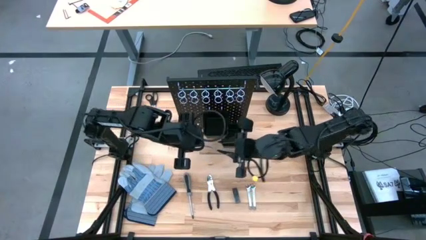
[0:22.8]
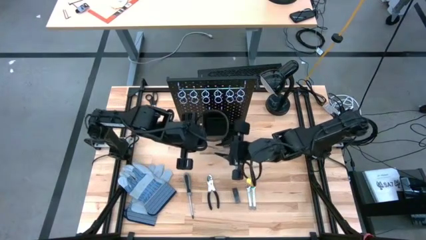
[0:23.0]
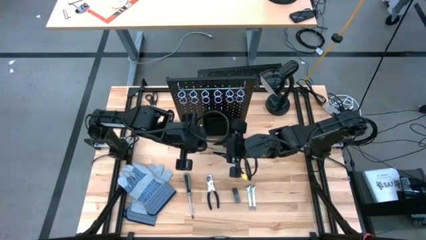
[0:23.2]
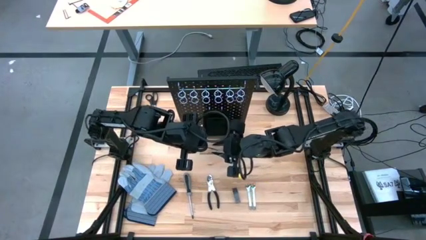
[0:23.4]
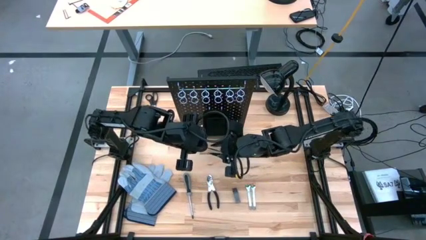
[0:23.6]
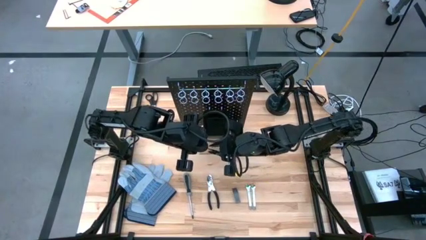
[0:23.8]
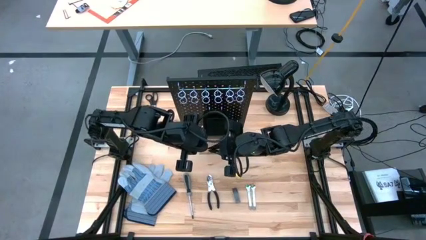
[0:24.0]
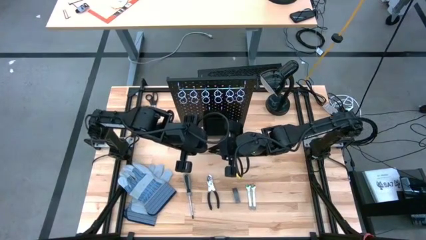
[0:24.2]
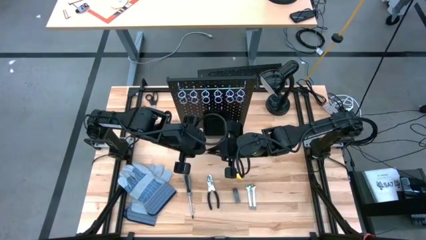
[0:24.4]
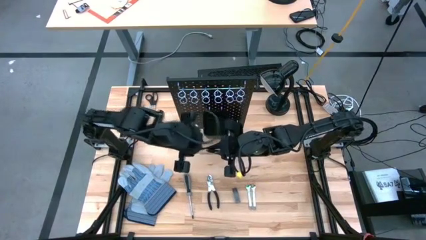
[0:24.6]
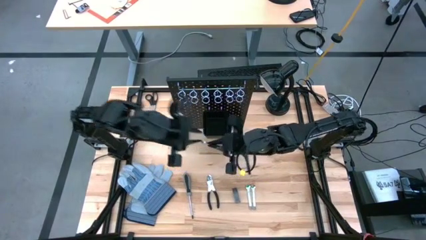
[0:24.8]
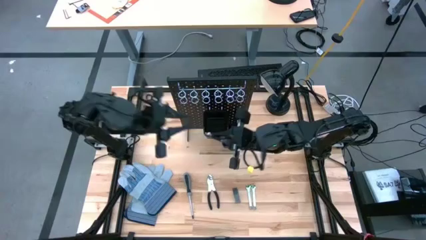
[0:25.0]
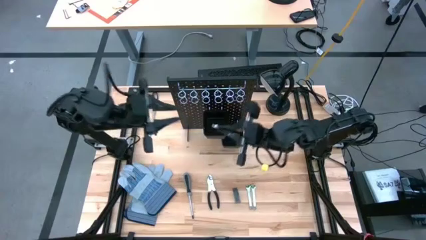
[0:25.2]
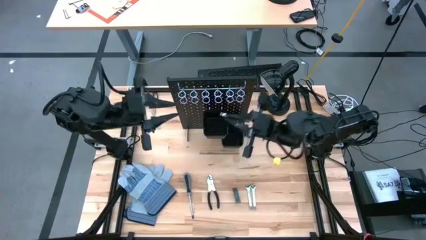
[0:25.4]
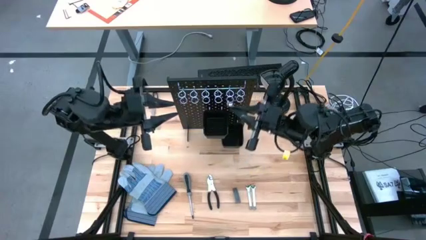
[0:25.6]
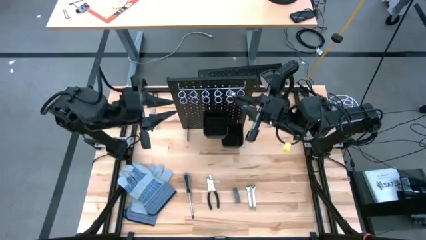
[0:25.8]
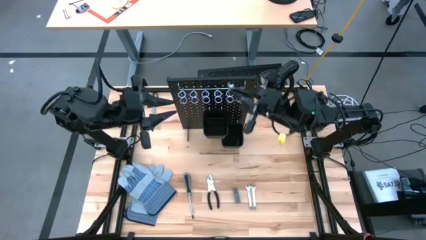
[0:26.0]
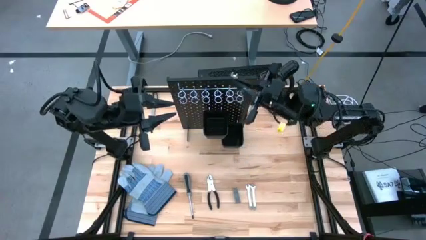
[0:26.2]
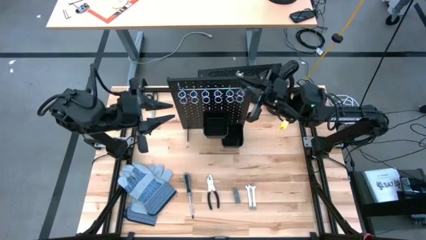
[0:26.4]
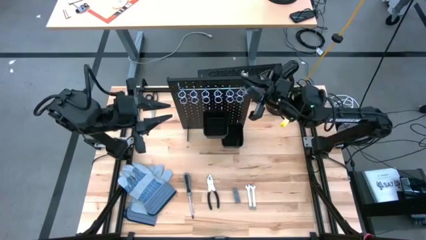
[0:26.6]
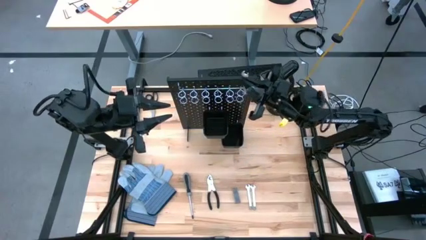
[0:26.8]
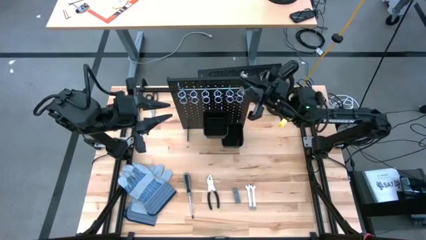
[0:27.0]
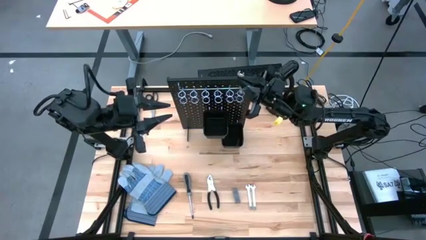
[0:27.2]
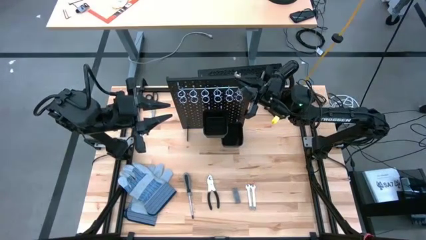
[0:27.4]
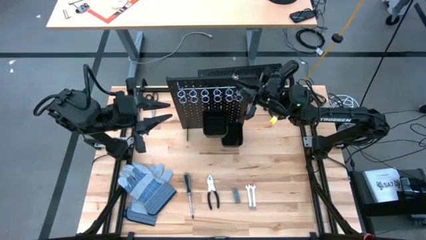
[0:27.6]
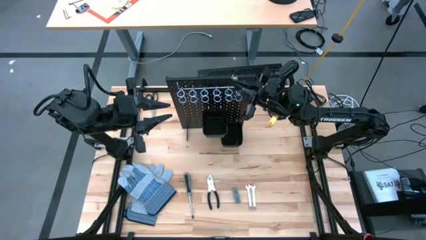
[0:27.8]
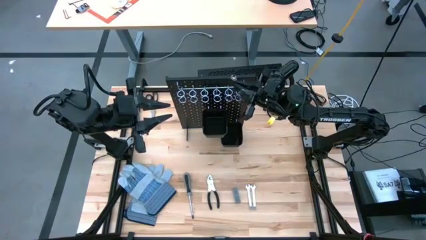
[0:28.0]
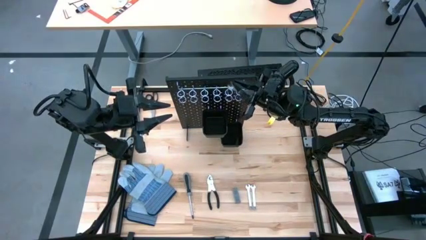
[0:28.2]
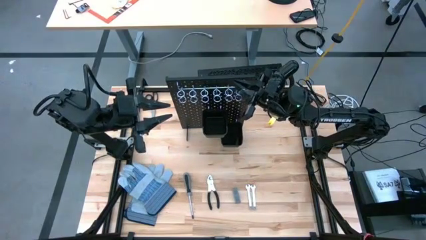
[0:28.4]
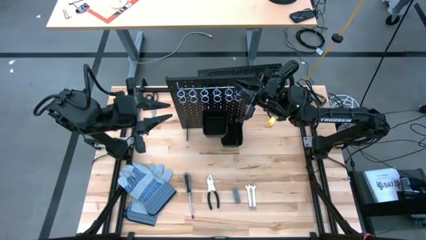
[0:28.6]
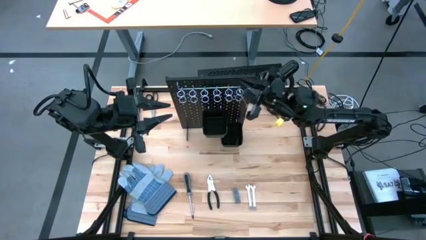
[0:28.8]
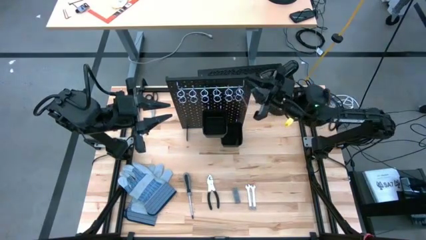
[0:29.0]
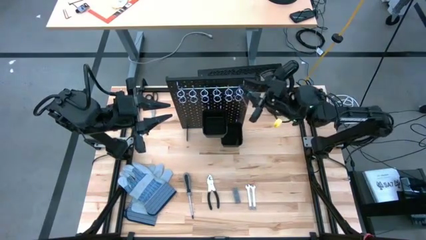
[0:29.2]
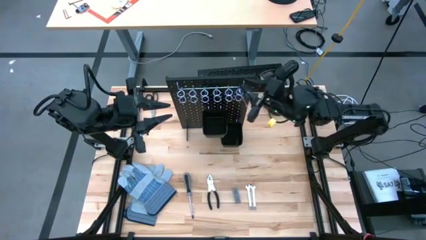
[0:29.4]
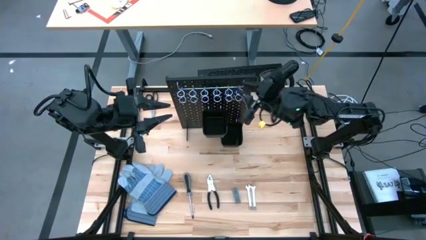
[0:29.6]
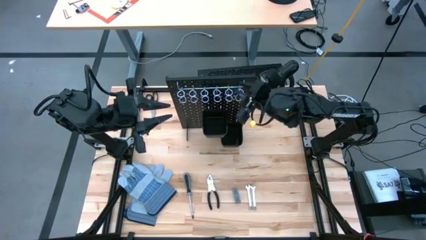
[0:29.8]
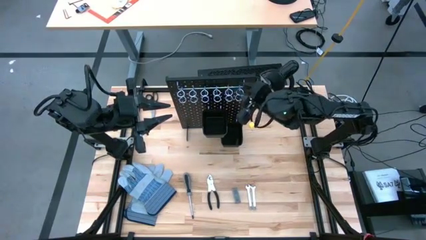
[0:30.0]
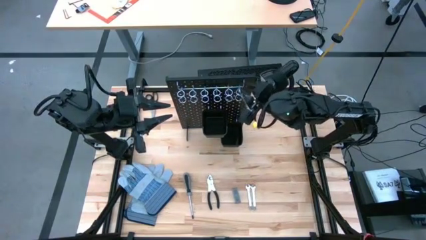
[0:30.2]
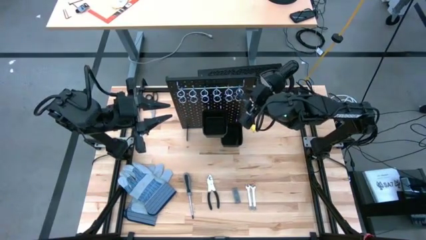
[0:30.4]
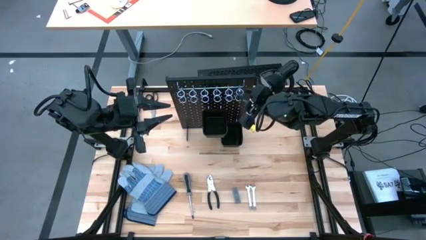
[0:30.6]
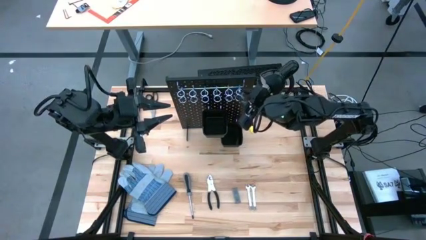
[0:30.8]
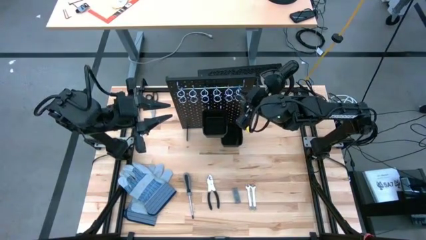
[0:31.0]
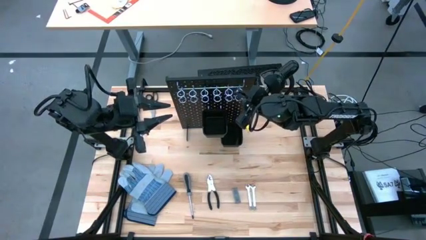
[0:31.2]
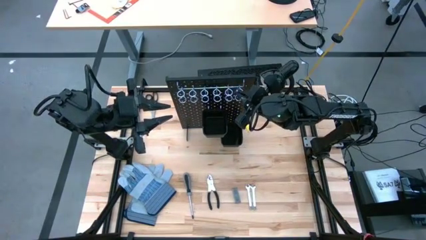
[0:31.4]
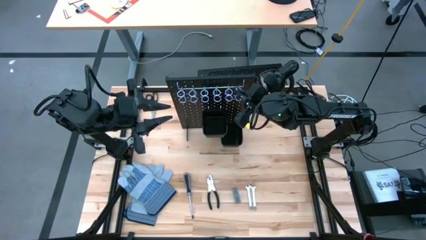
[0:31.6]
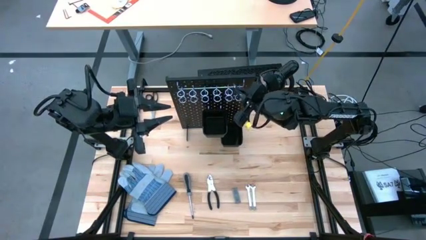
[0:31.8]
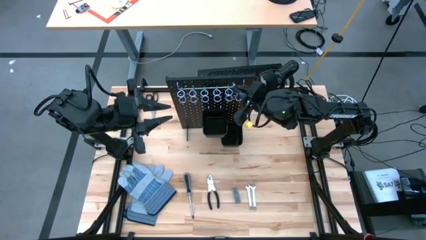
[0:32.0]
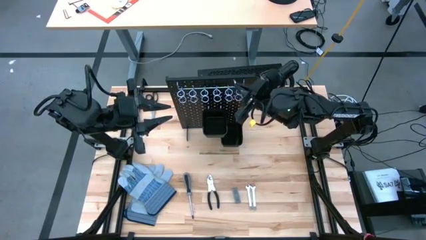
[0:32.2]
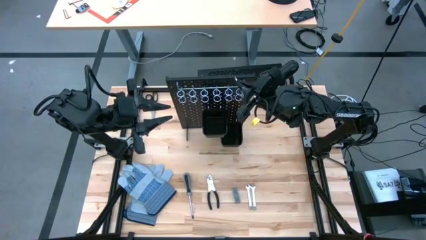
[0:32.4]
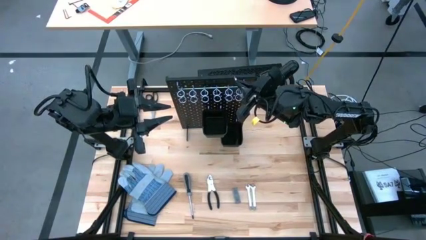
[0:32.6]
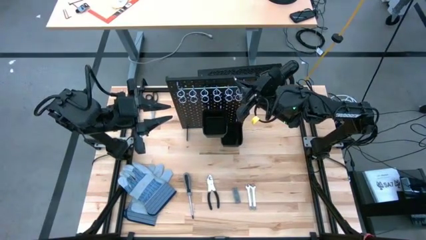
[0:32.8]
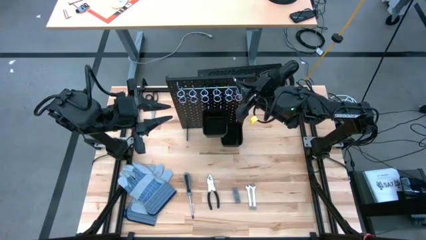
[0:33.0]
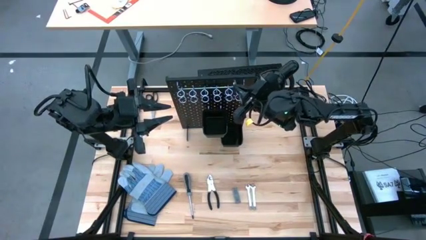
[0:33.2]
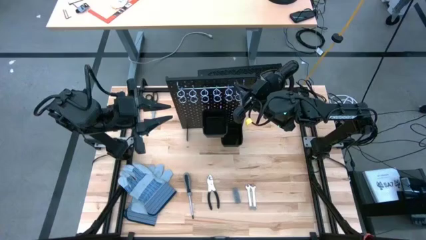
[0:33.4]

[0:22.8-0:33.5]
Task: Hang tools onto peg board
Hang the right silver wrench on the black pegboard

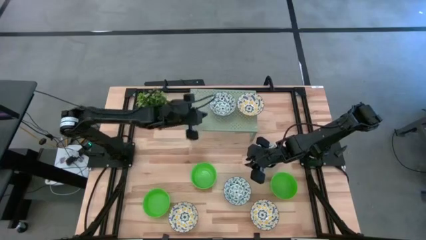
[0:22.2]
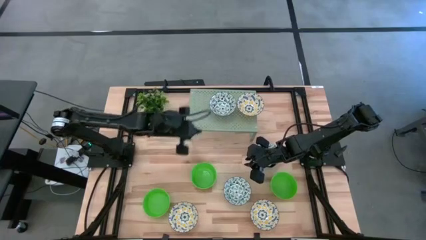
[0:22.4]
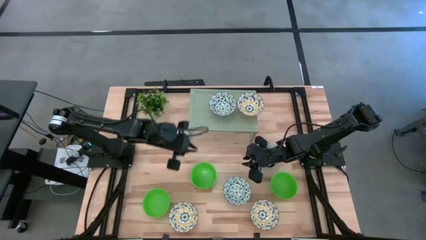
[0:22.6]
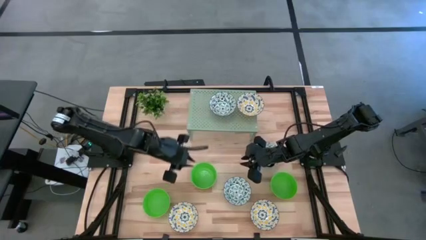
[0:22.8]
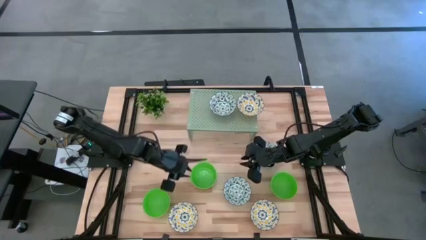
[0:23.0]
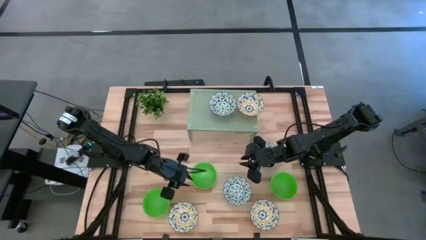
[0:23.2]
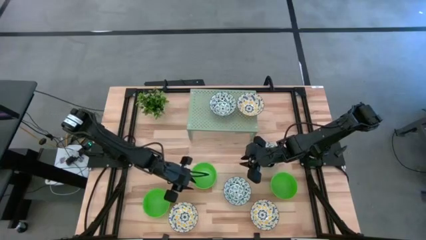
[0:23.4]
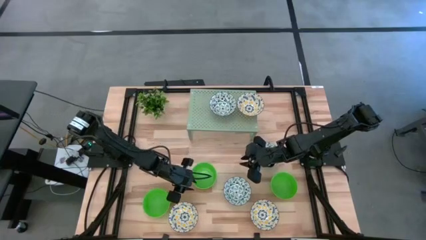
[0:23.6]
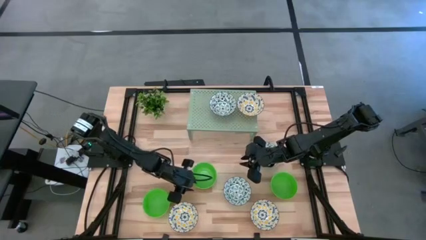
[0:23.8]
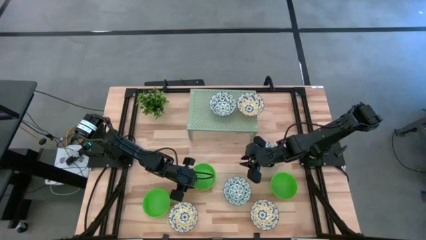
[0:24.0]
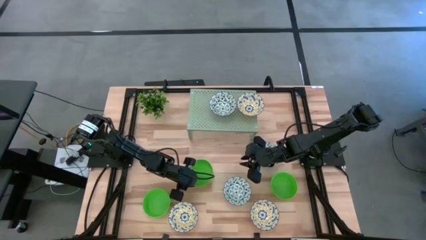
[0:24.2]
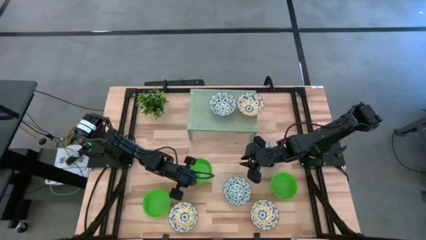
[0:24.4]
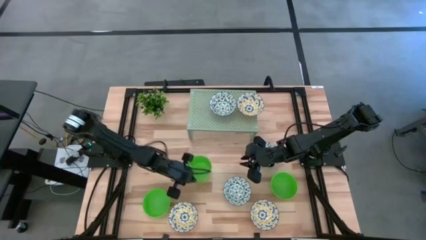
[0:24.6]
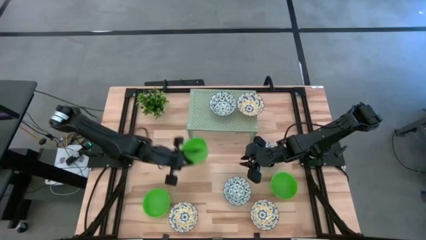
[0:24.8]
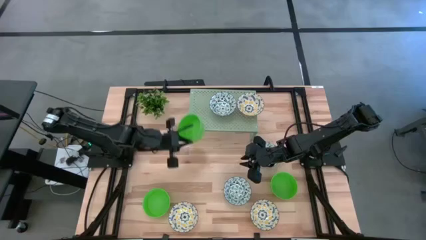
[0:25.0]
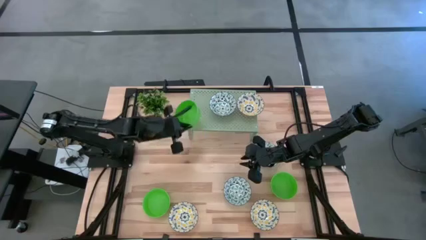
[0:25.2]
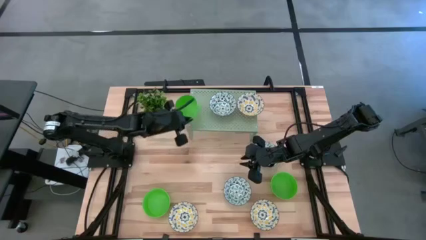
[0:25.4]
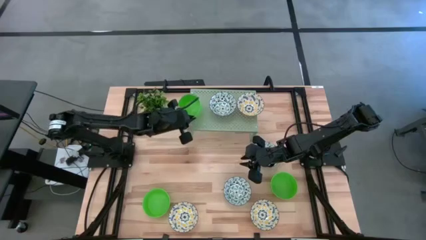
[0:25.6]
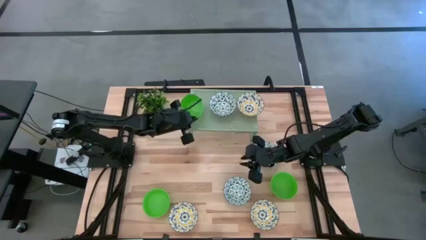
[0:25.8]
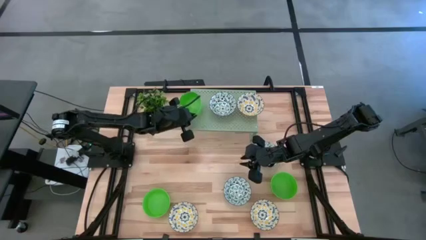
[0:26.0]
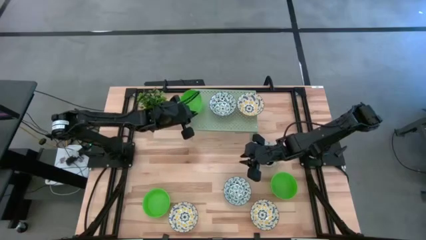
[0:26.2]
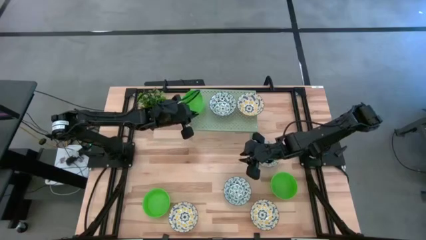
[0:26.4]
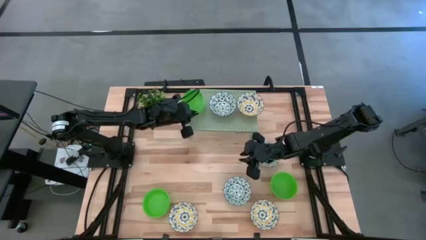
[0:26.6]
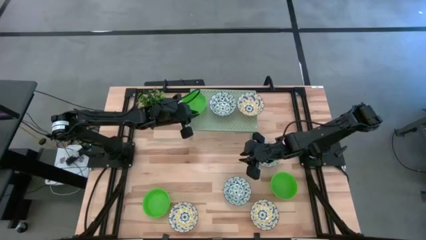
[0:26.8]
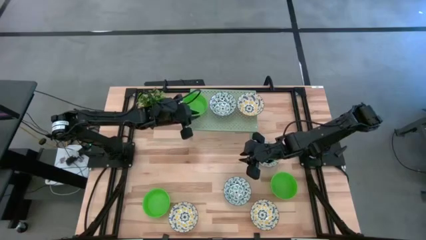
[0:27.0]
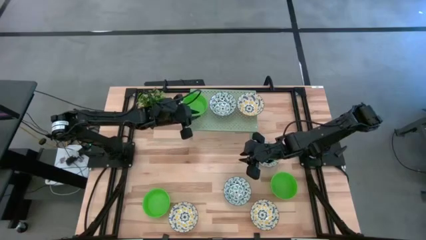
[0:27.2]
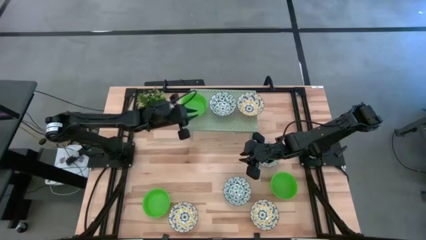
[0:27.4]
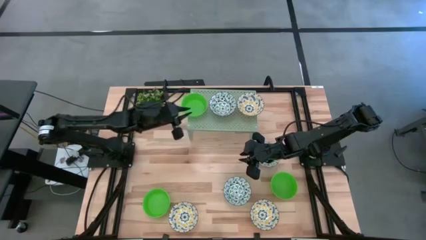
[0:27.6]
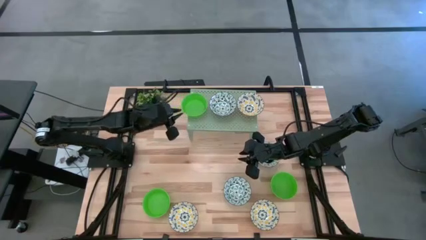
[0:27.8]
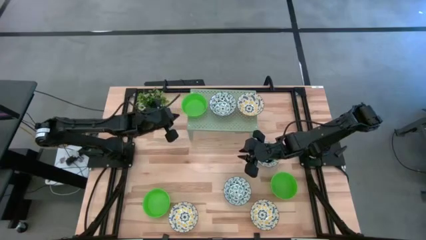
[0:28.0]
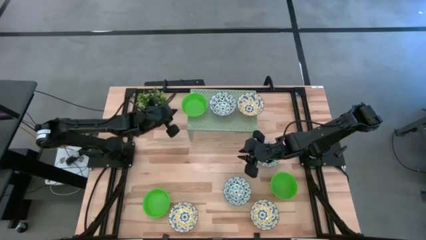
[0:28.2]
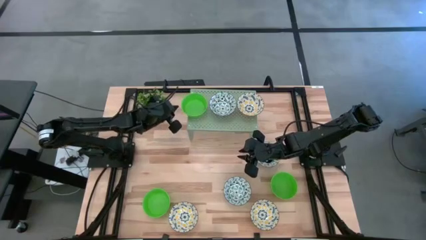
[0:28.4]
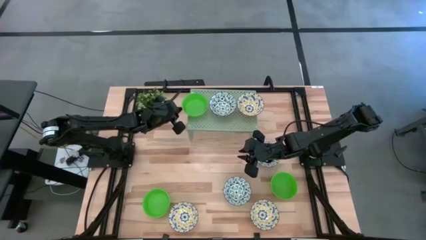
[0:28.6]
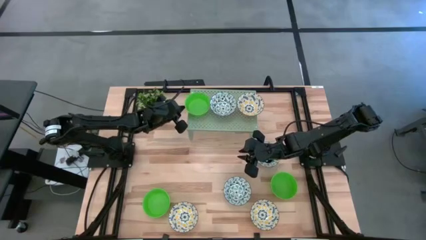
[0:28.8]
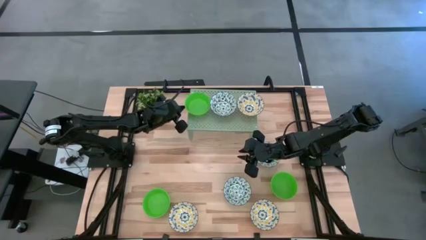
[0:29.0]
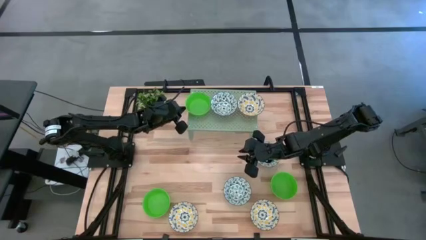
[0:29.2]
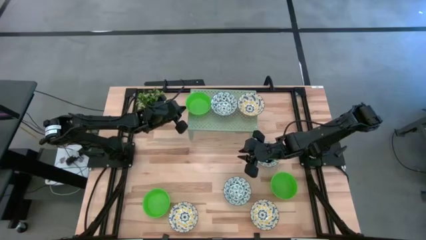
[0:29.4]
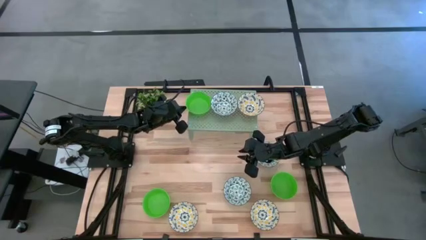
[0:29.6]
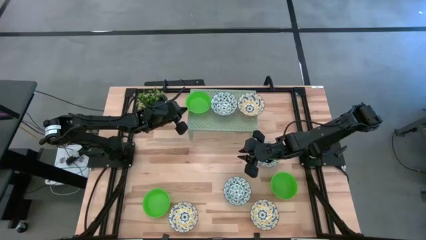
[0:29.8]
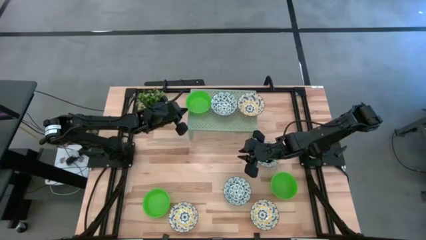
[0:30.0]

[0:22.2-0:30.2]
Task: Pick & Place Mini bowls
Put the middle green bowl on the shelf
